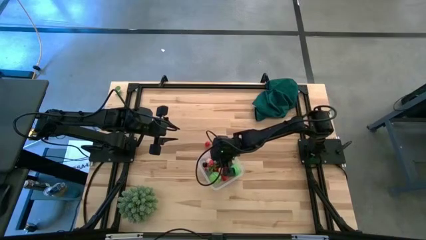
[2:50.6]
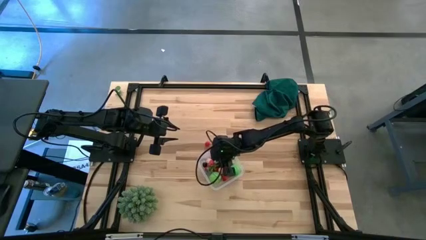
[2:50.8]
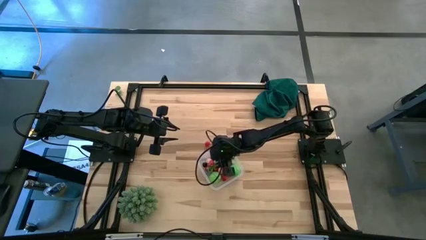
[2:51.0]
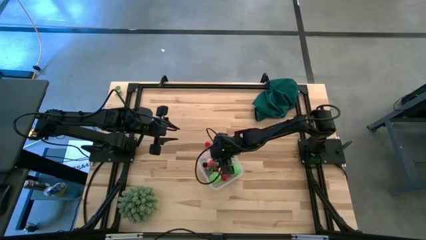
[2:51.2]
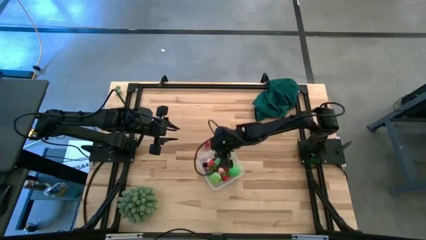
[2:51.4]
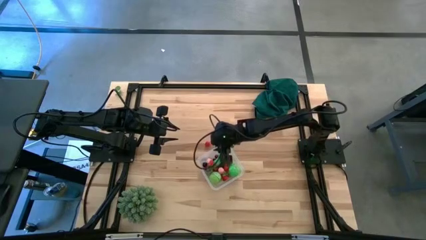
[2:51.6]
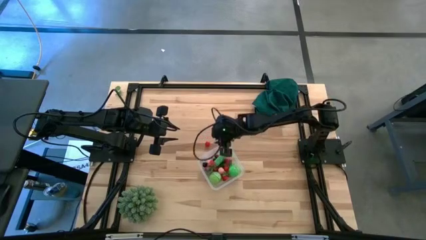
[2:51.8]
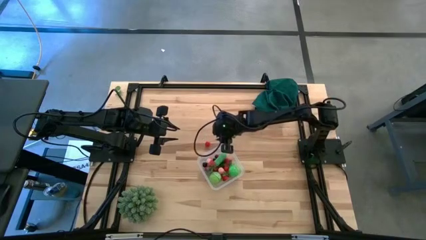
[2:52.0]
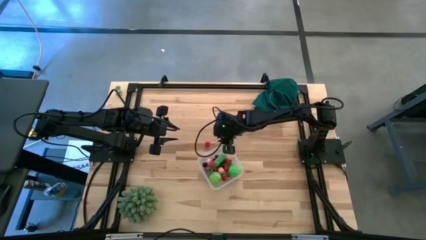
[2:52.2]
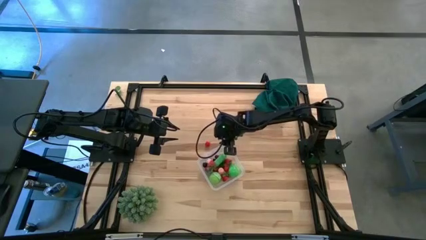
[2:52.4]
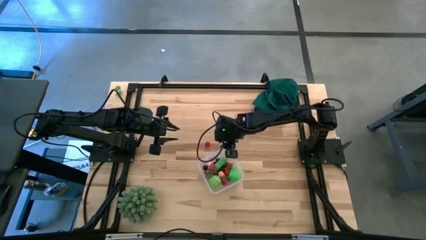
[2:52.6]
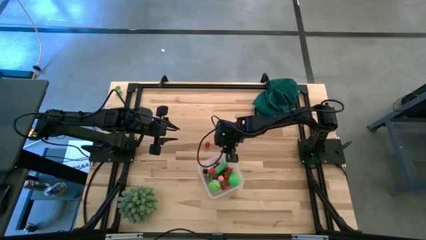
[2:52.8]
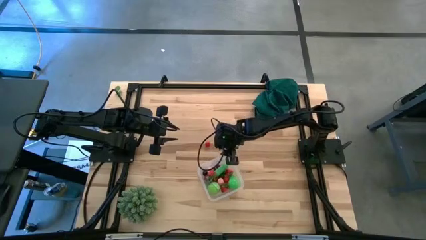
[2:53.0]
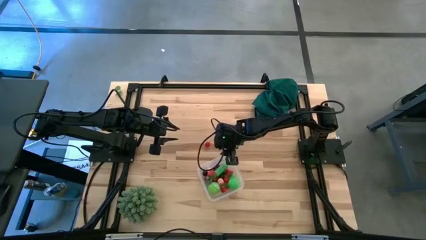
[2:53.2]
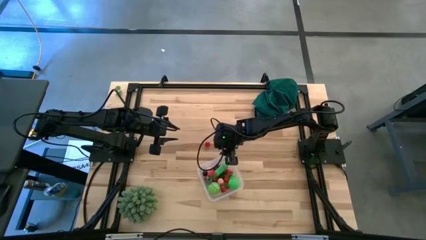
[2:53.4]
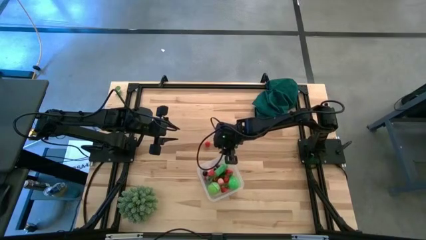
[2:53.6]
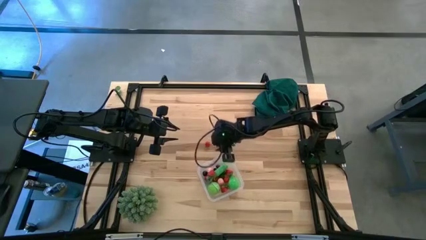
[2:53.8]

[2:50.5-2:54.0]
Task: Pick and placing Produce into tupperware
Adjust the transparent container

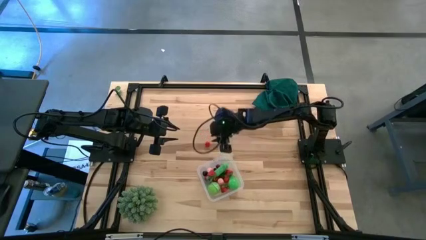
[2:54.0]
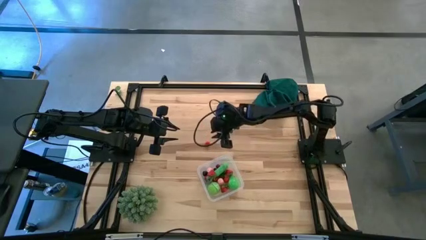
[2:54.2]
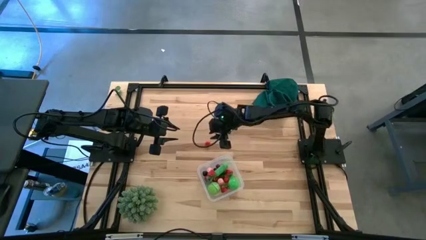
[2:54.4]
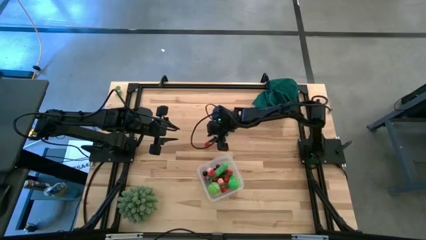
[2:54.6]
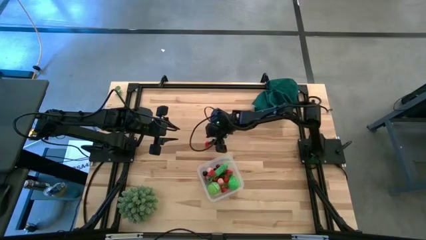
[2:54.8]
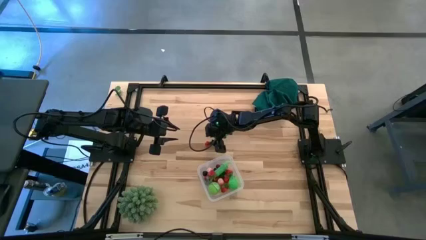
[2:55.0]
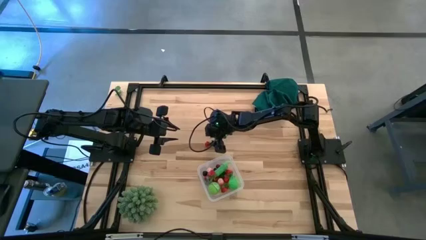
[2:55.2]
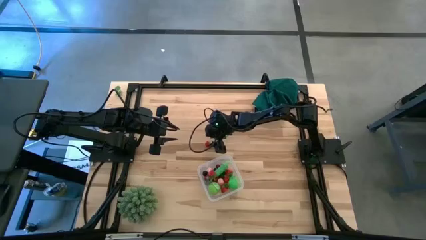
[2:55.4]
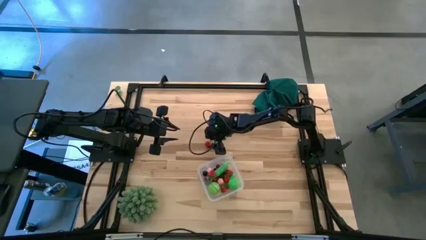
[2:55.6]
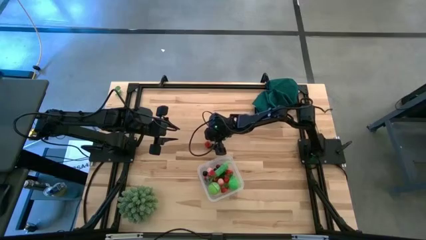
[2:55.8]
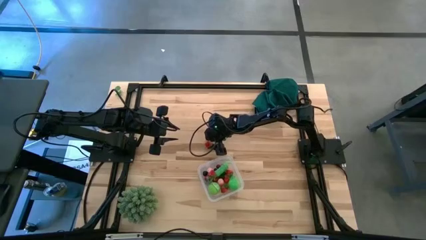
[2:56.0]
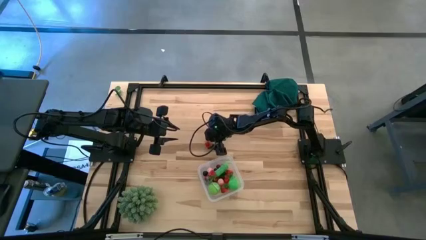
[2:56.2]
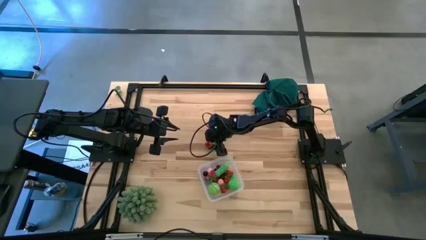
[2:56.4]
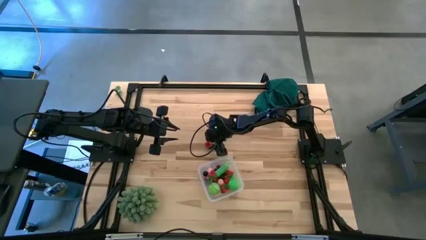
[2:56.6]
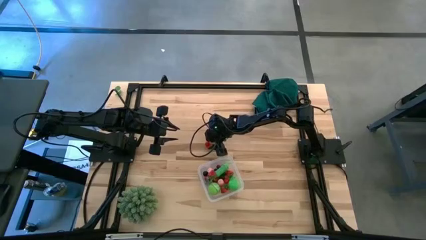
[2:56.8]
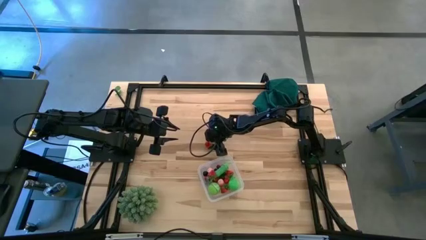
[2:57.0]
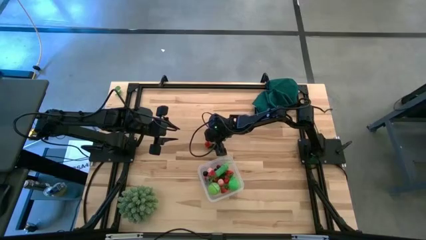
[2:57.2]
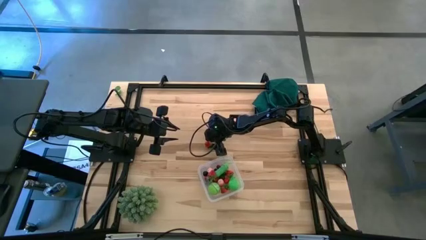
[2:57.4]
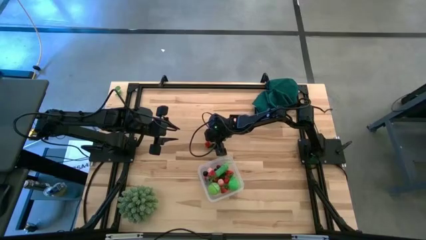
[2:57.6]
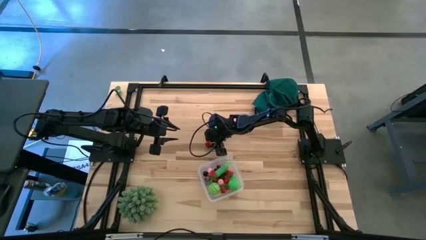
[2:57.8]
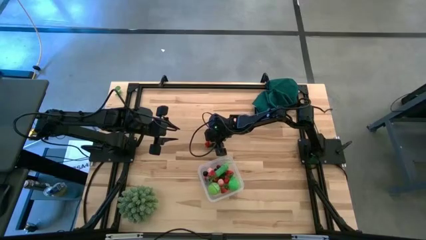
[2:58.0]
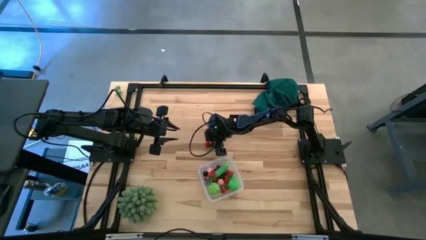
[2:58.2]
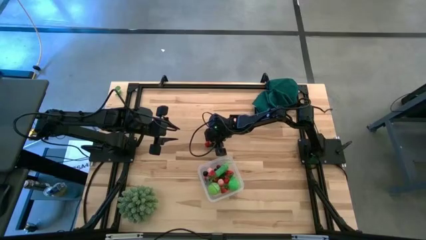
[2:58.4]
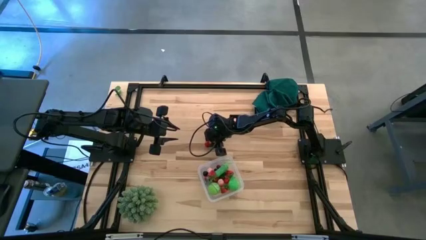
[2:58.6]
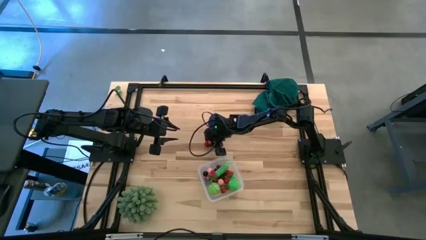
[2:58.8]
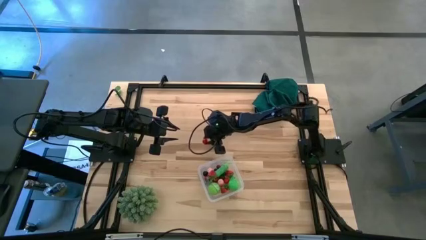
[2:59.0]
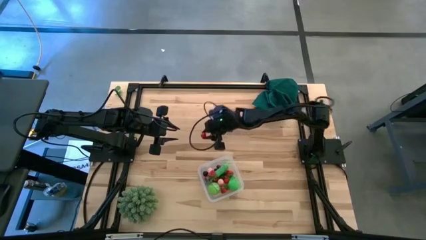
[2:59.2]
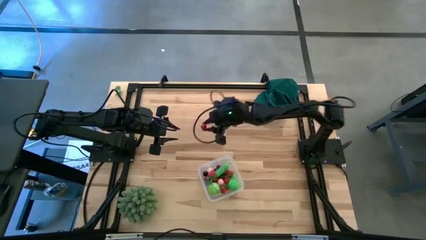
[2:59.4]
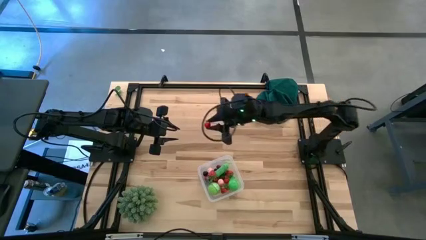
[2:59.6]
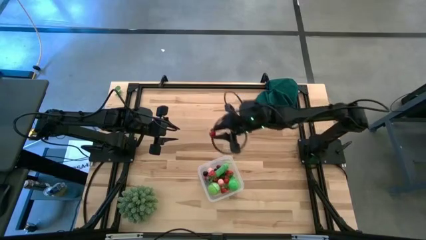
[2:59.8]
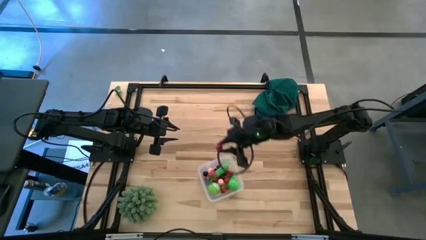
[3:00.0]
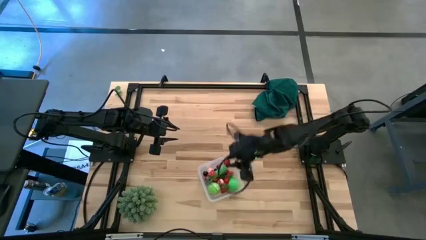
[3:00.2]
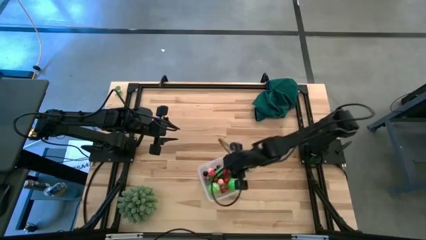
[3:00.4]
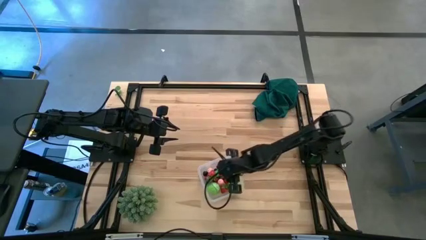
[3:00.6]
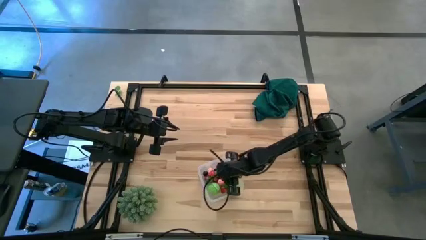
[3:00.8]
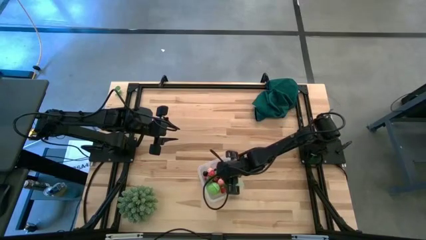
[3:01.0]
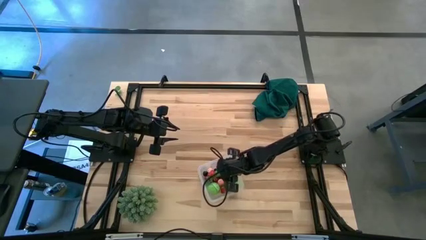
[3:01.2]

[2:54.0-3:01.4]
Put the red cherry into the transparent container

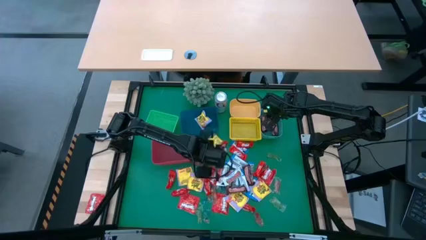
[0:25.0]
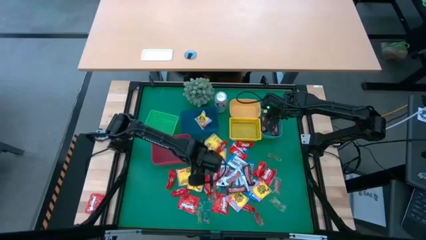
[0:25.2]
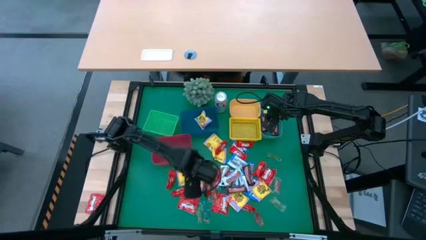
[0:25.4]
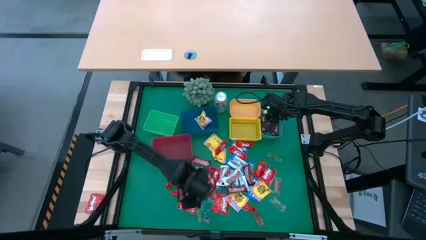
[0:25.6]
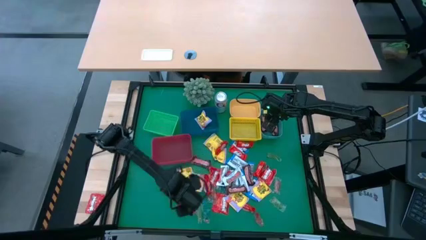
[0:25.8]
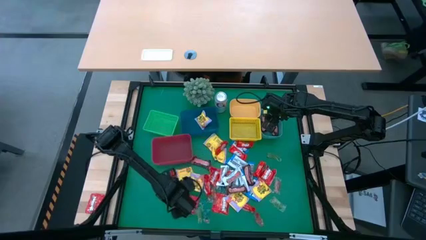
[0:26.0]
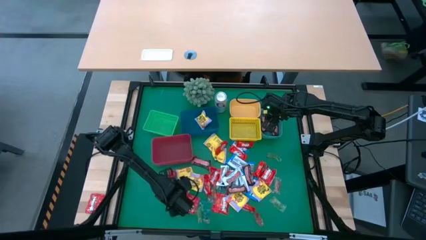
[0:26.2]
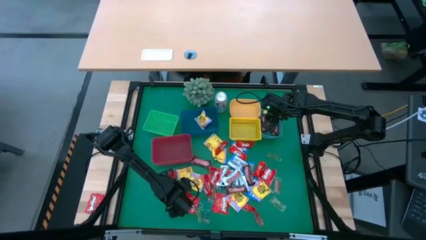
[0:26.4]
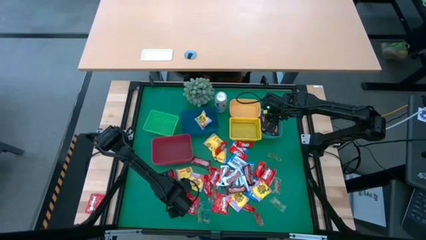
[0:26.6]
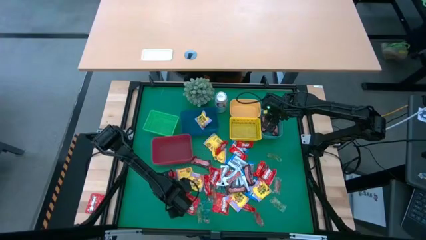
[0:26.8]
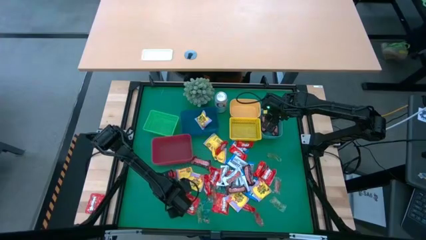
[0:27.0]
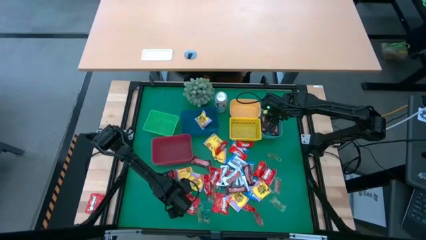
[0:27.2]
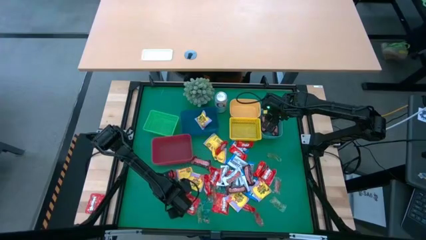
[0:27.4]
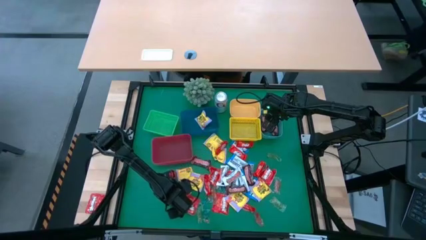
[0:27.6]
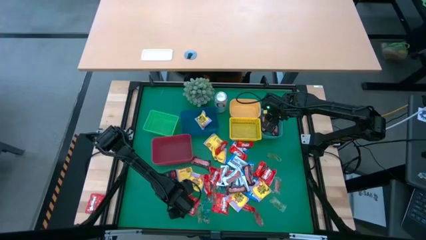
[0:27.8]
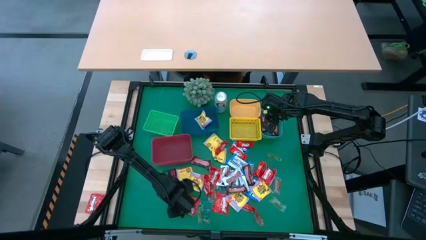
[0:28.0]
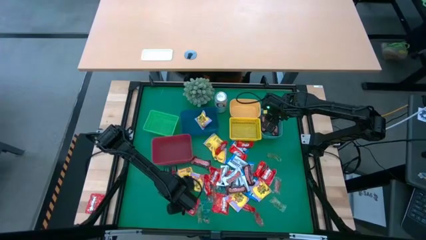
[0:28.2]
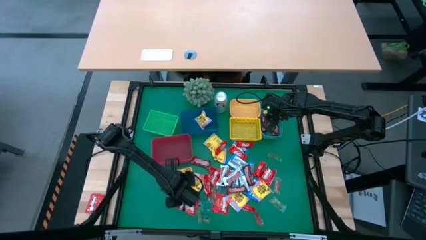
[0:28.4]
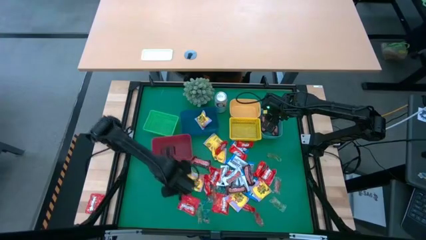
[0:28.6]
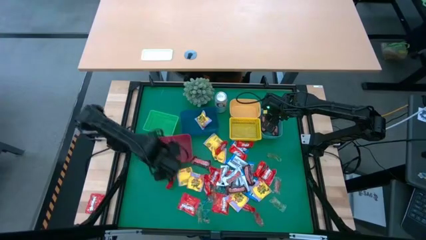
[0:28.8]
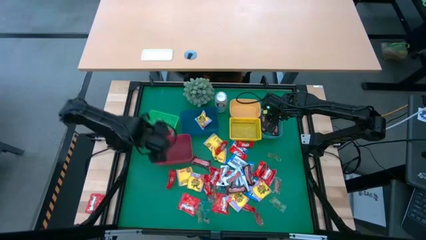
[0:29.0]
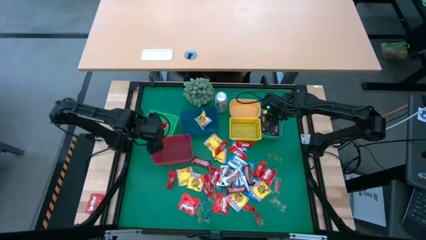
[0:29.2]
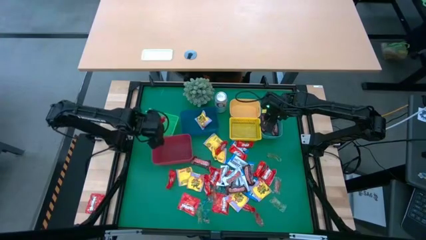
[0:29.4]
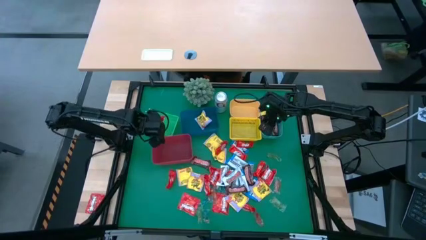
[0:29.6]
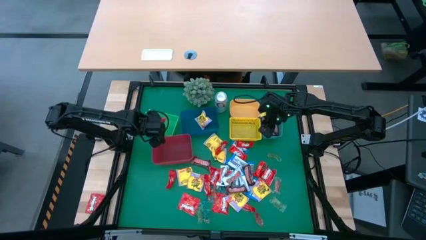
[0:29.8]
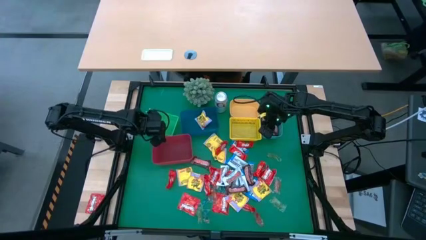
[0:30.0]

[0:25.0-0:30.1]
Task: Sort candy
Put the red chocolate bar into the green bin
